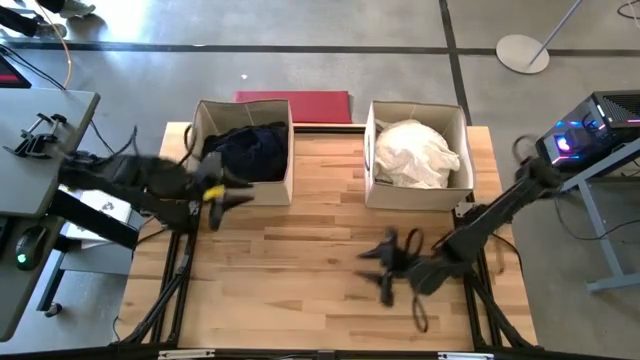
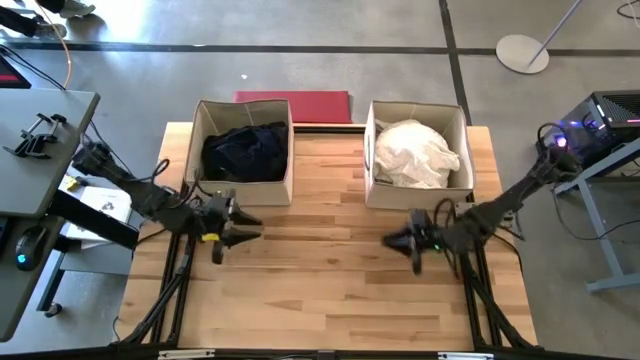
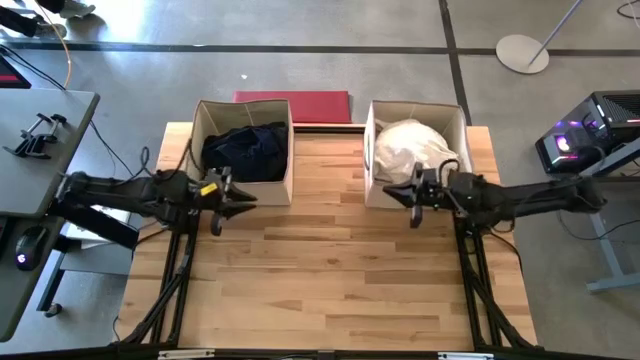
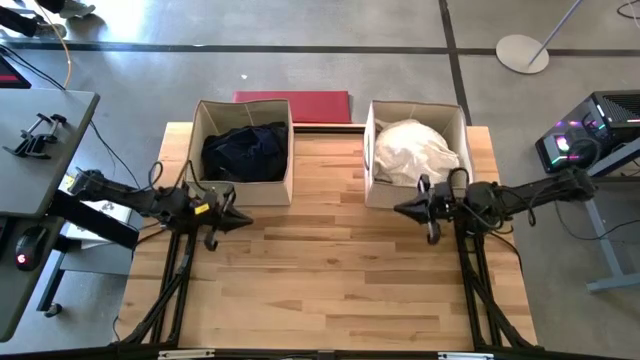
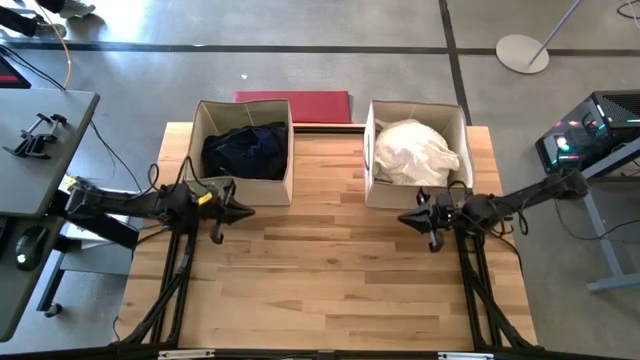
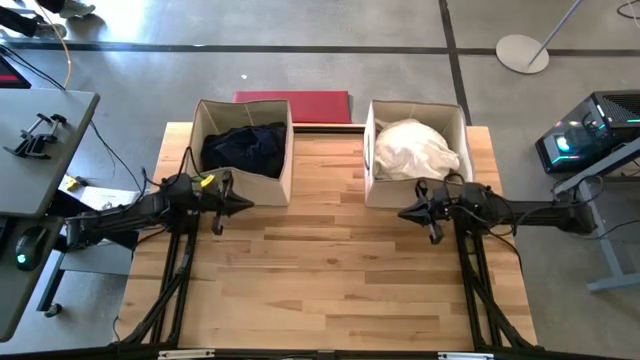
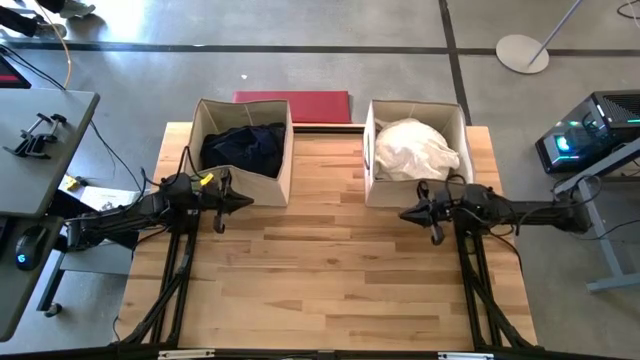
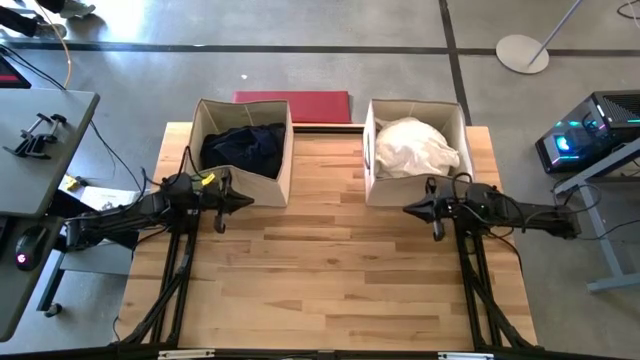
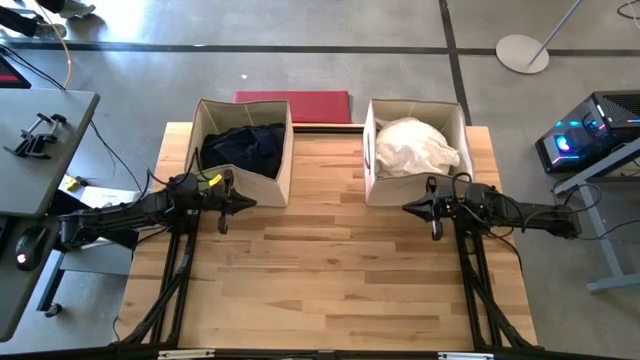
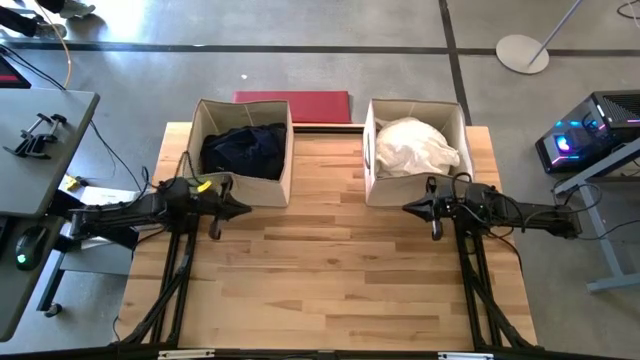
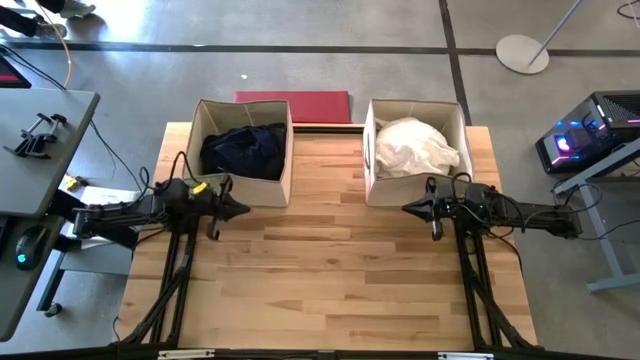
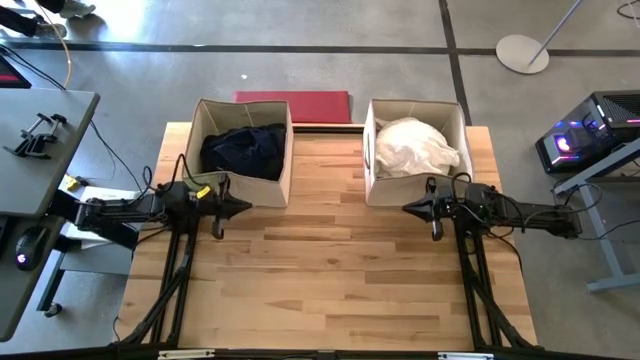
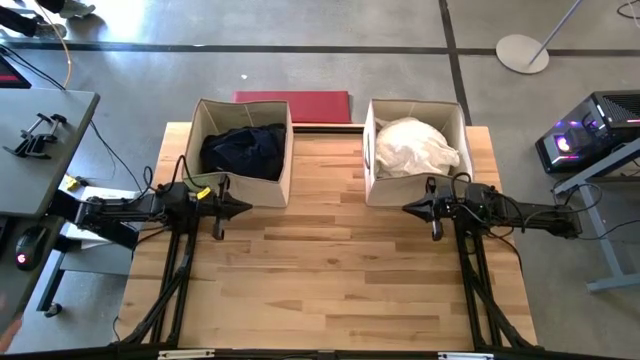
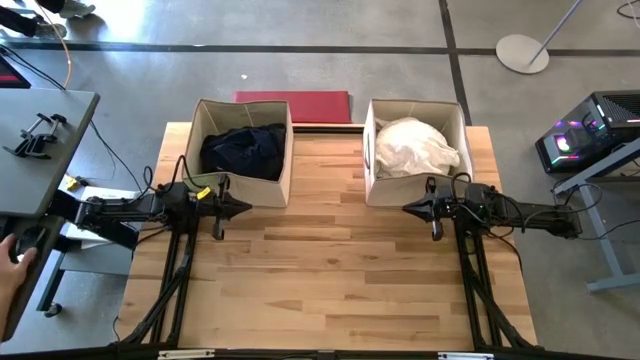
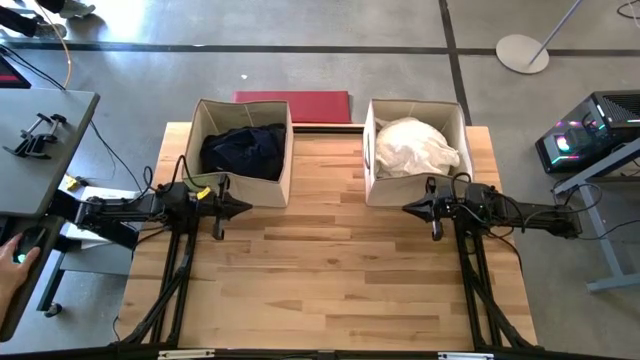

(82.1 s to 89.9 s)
Task: Sort clothes
Return to Home Position

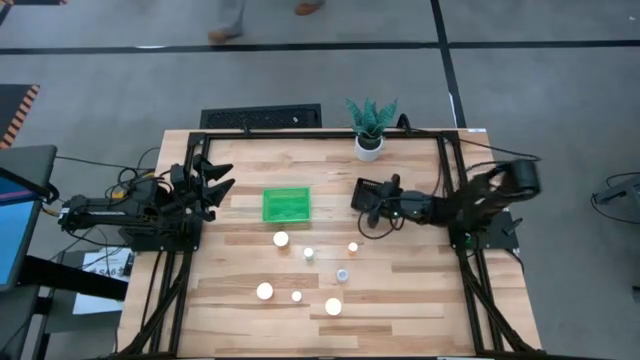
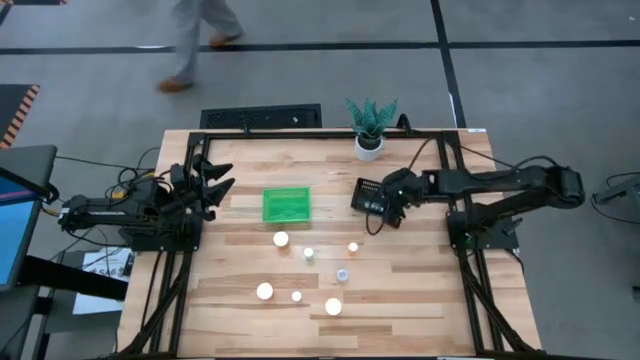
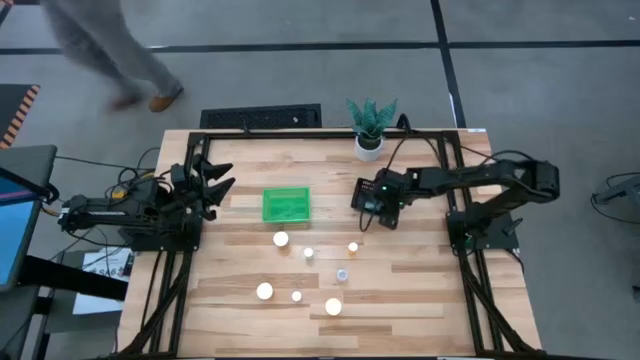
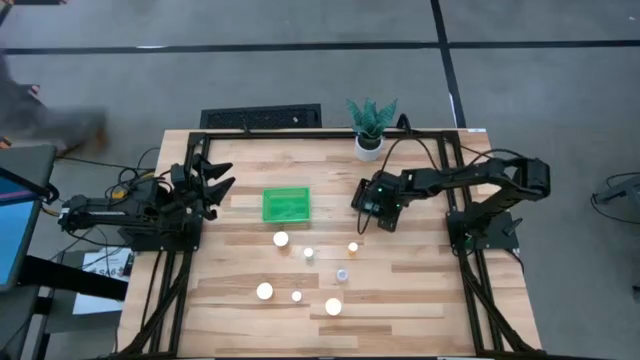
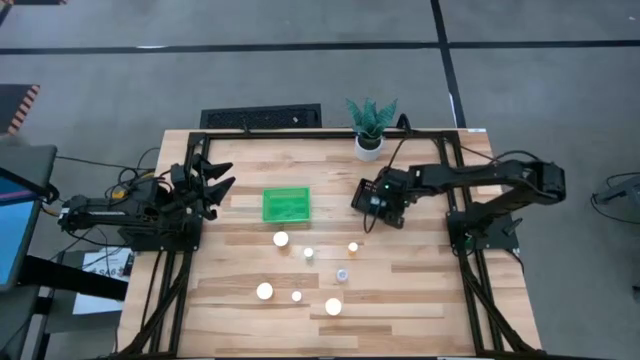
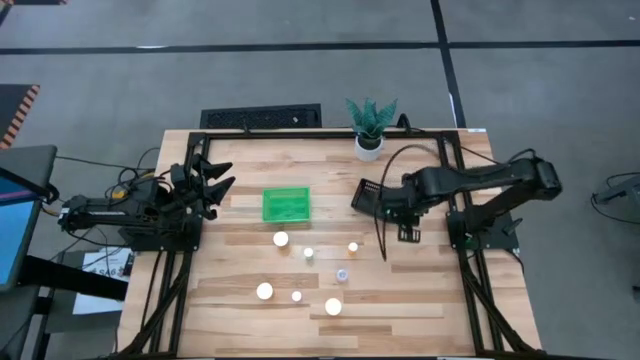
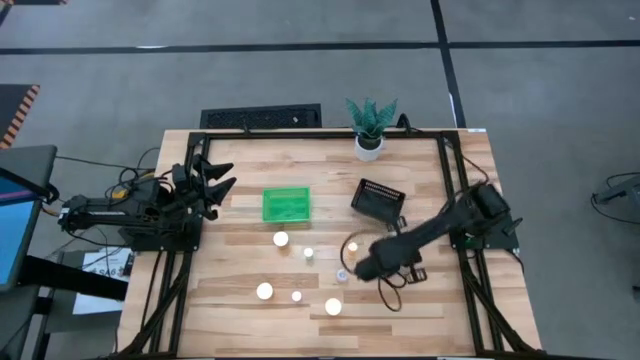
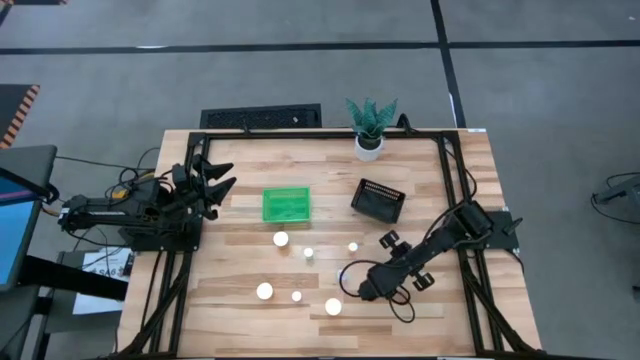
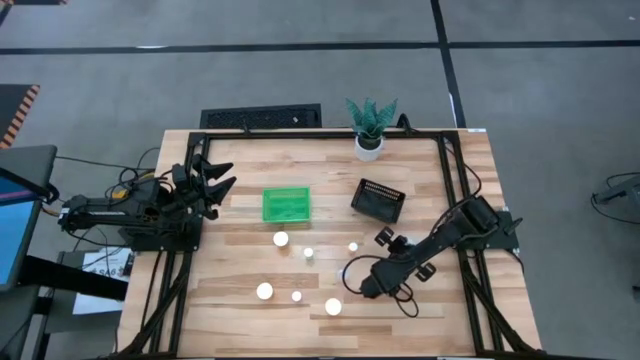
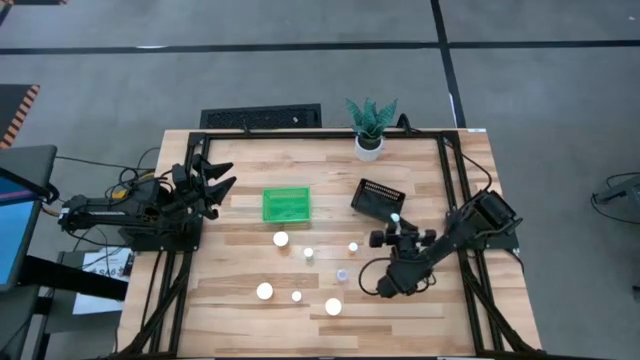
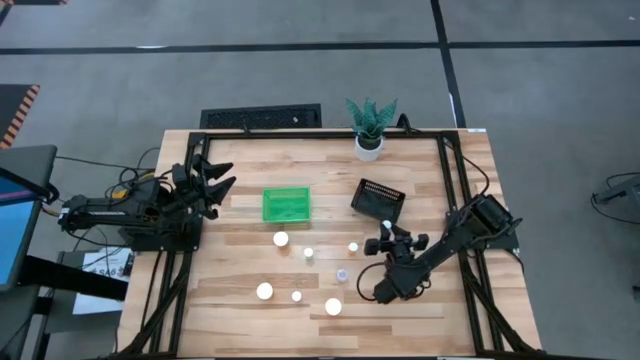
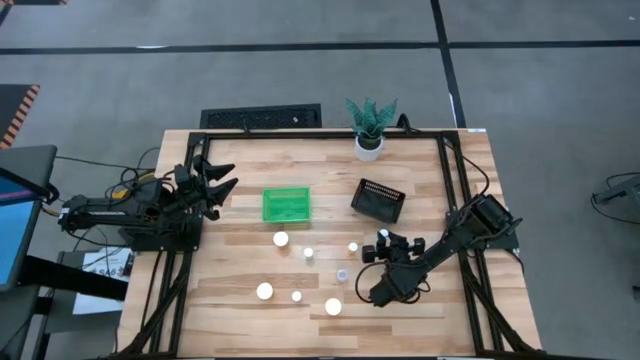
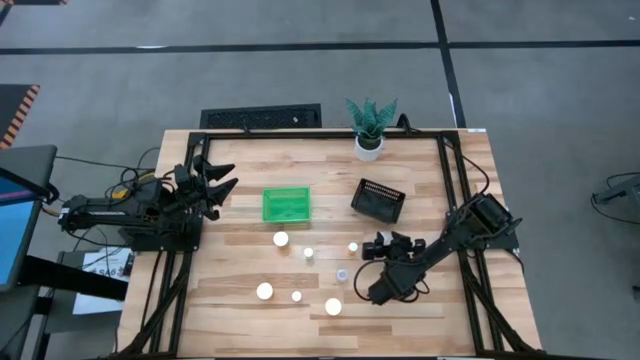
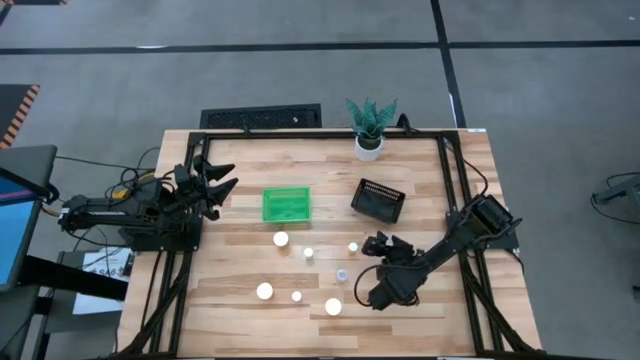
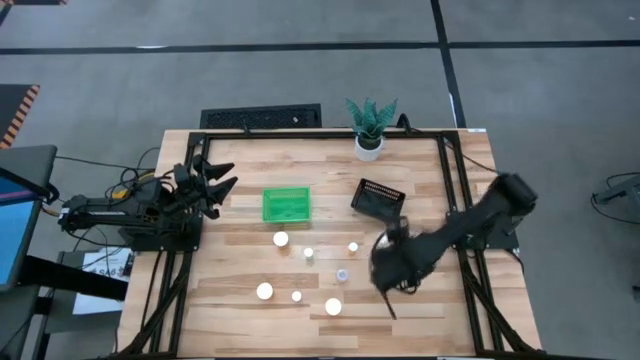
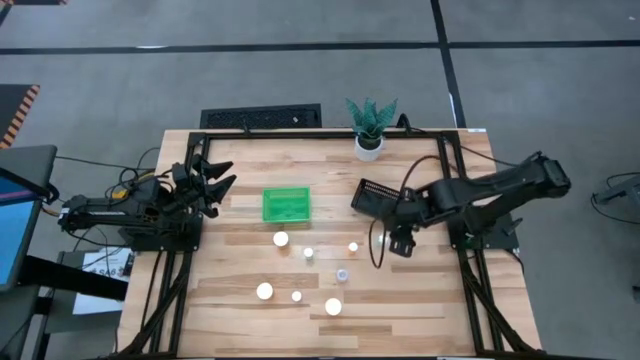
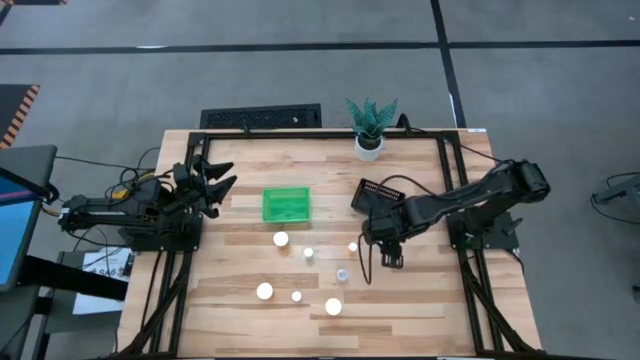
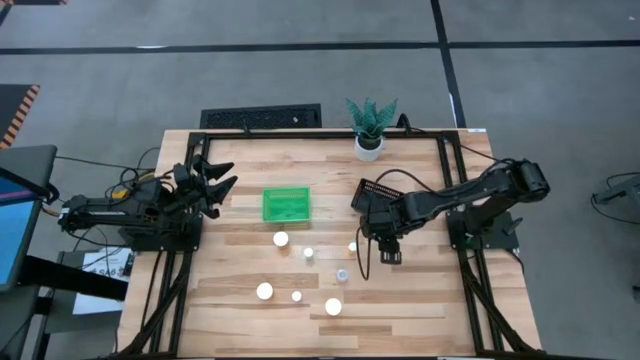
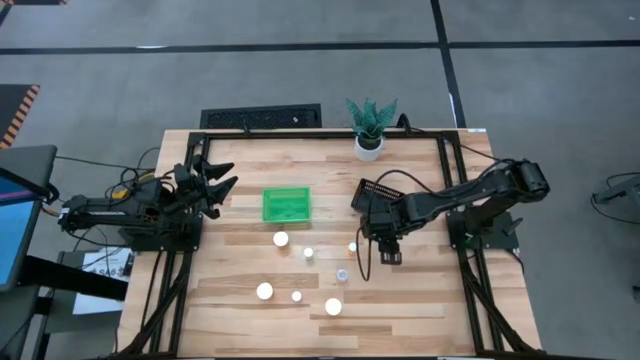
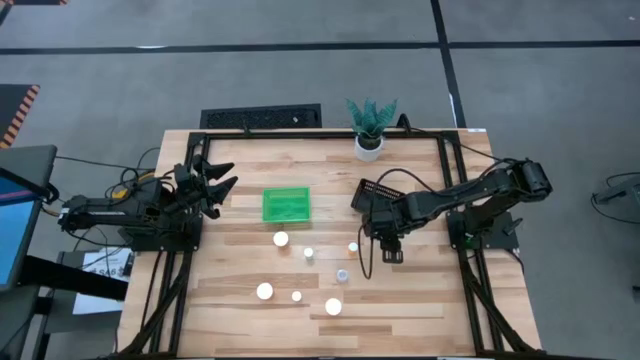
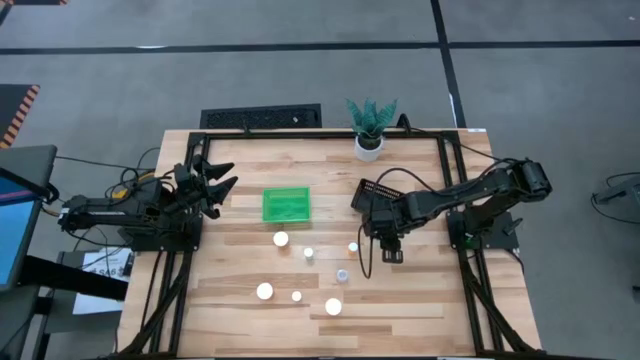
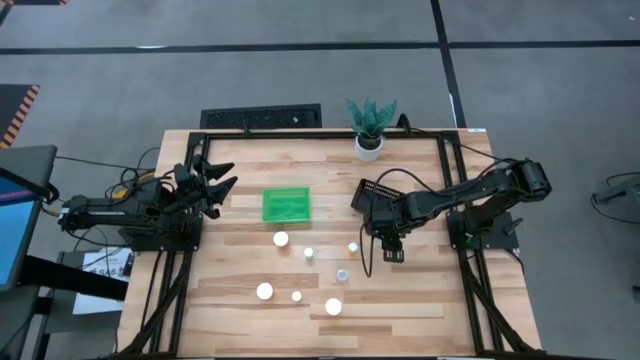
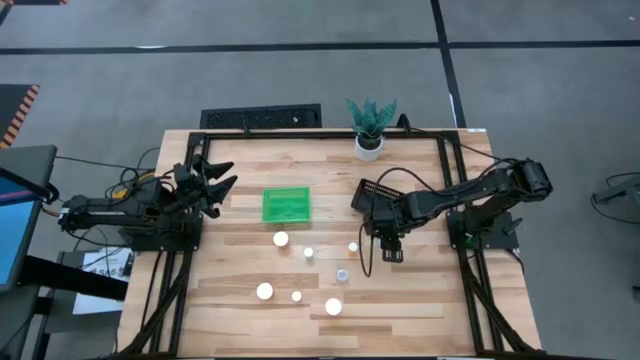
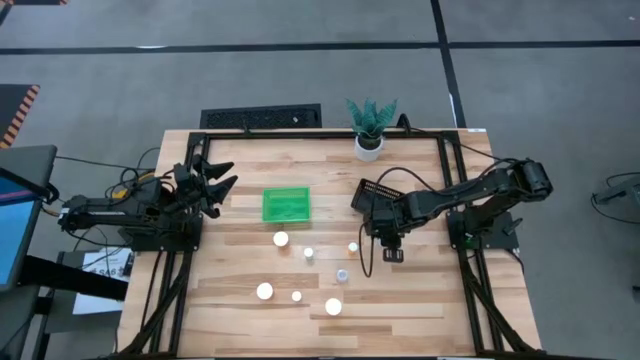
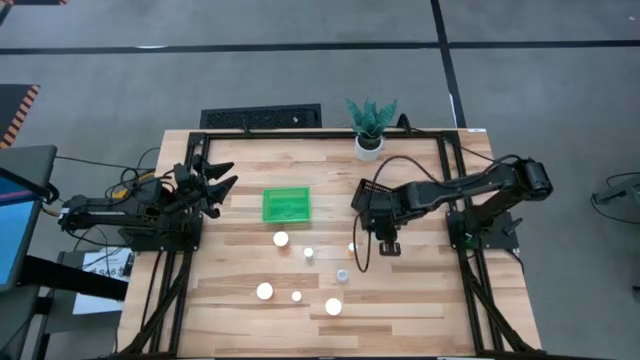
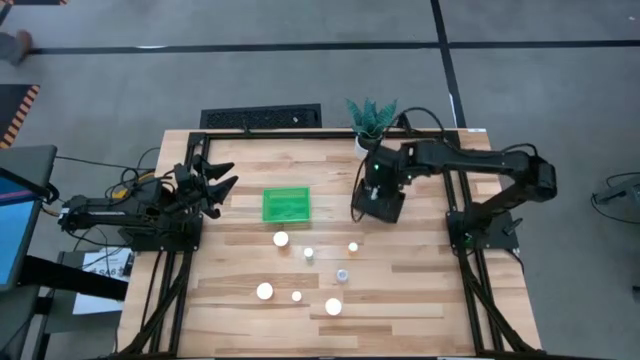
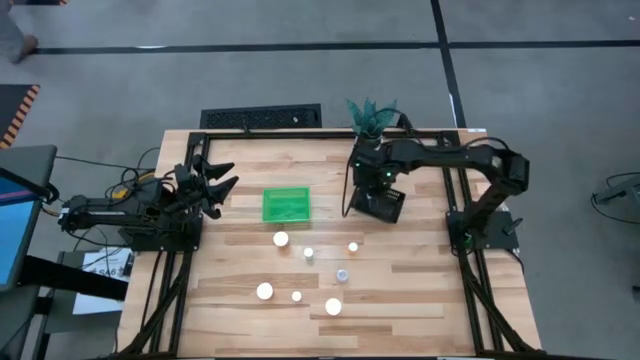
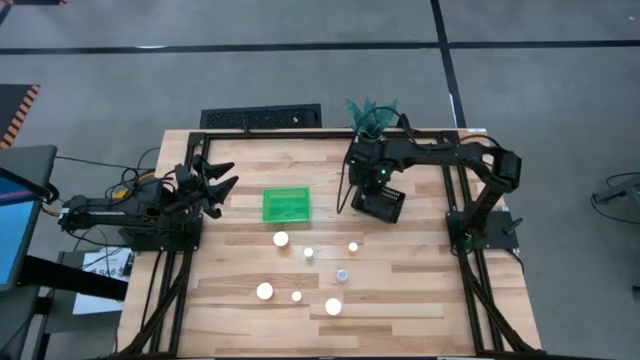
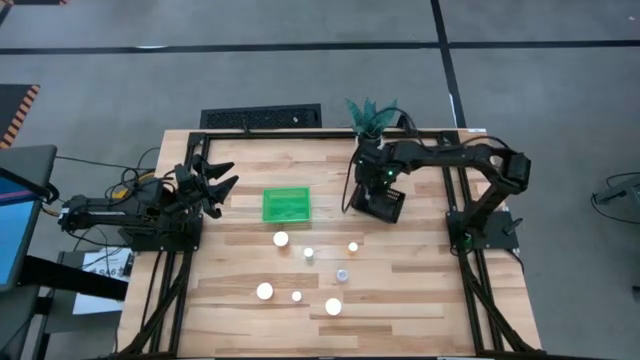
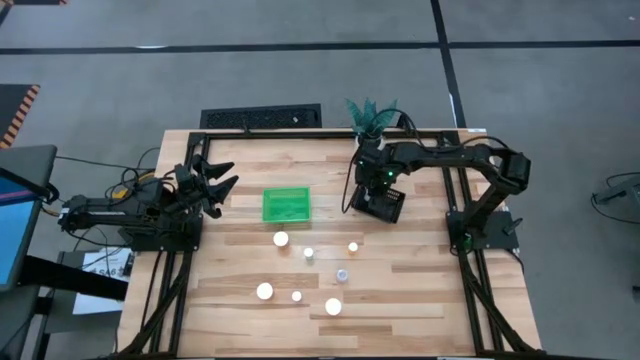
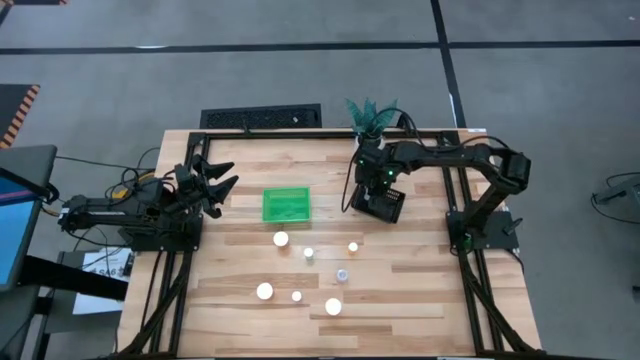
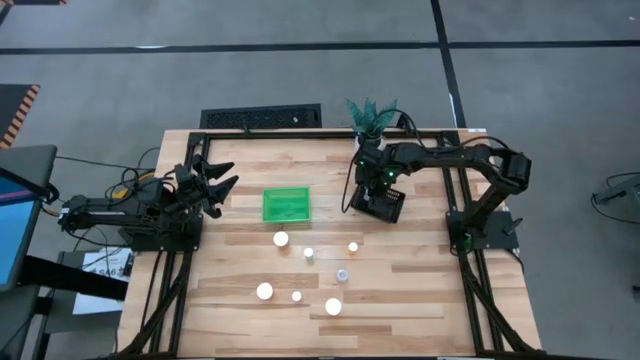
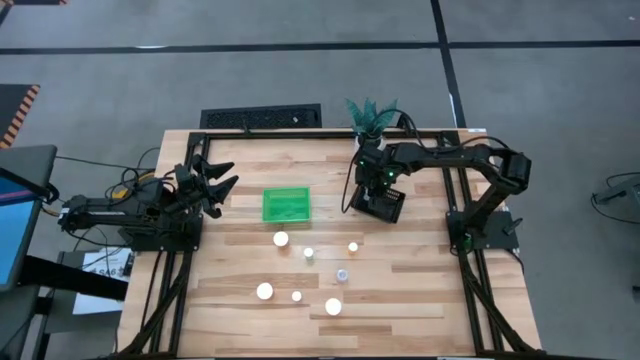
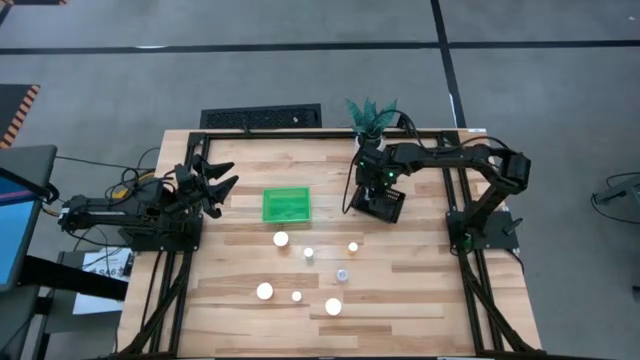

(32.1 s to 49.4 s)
Task: Pick and place medicine bottles into bin by pill shape (circle, oval)
Put the right blue tablet bottle into the black basket
